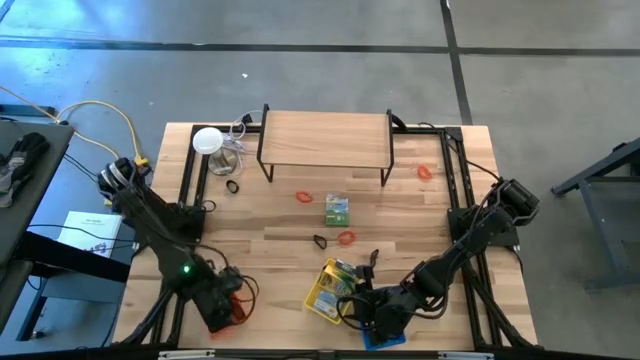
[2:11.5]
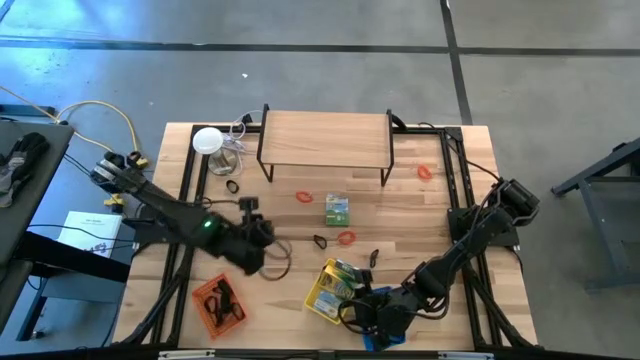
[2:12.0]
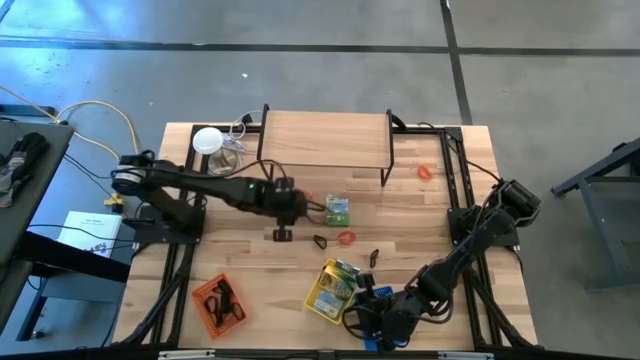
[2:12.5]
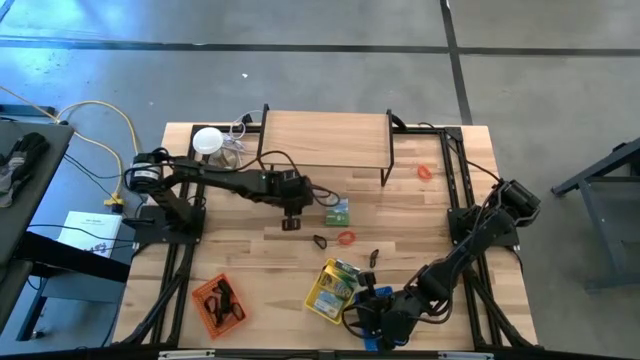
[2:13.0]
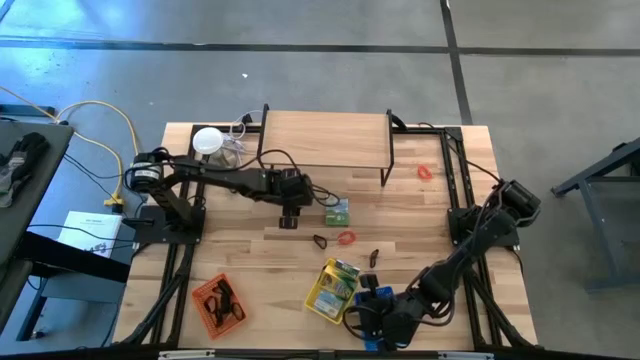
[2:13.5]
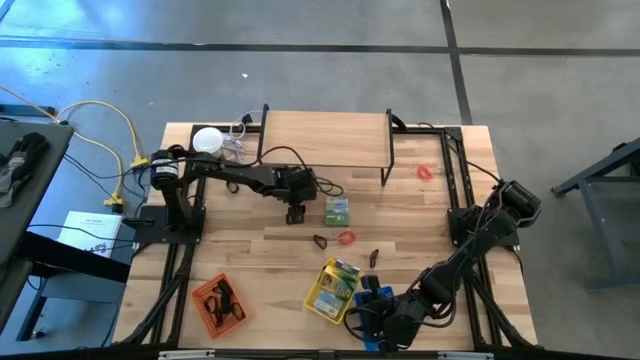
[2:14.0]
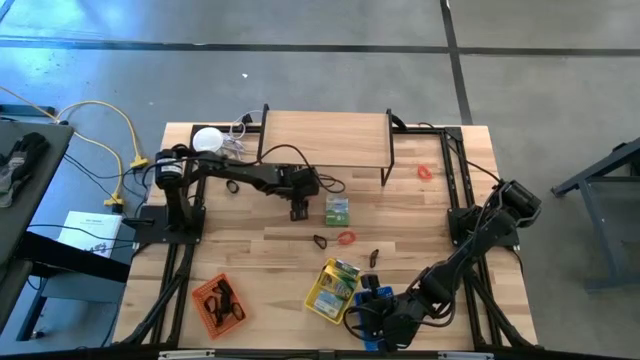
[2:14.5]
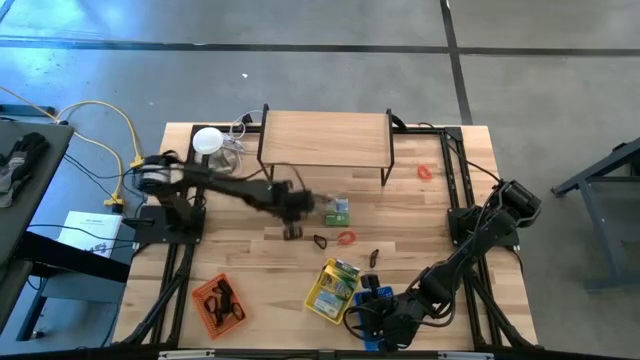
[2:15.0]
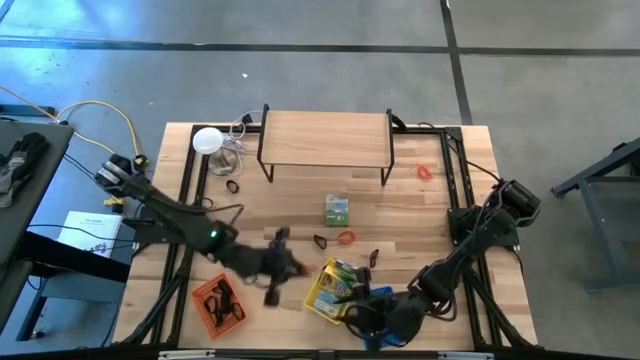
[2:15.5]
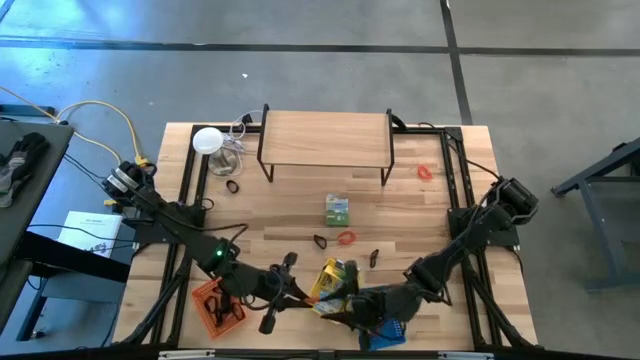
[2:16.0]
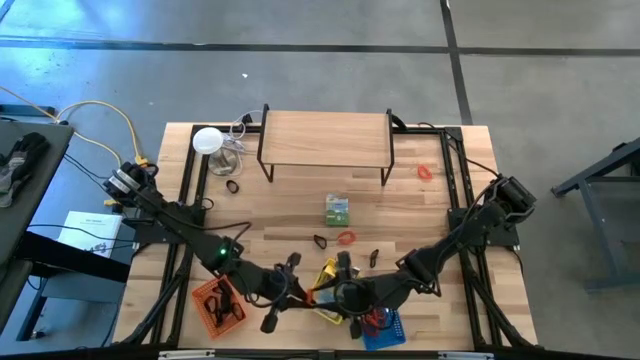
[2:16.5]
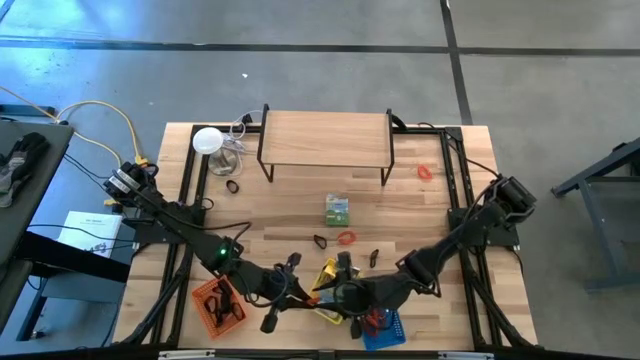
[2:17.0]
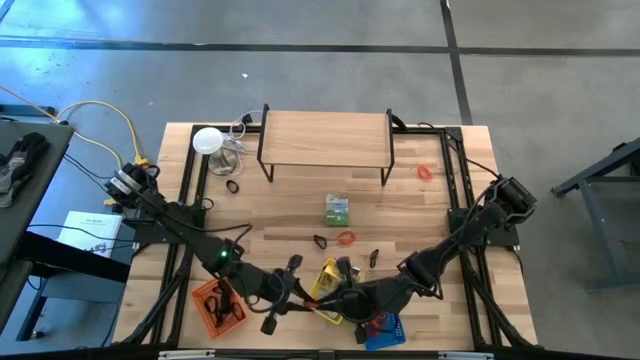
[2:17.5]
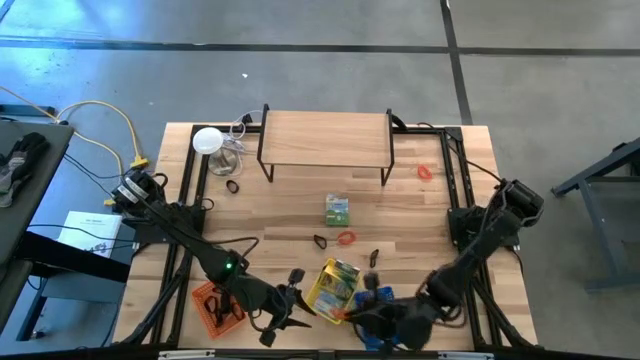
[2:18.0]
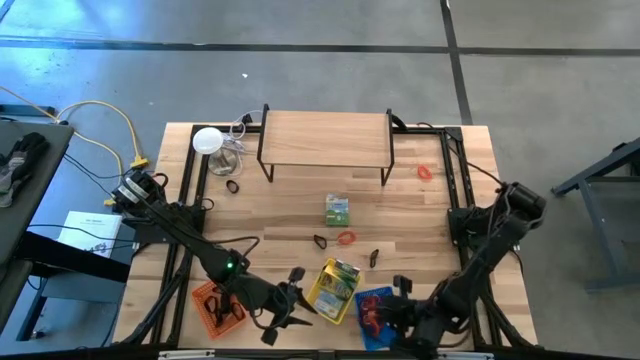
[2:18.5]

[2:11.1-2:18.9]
Task: Pick & Place Office Desk Supplies
Put the middle left orange spring keychain into the blue bin

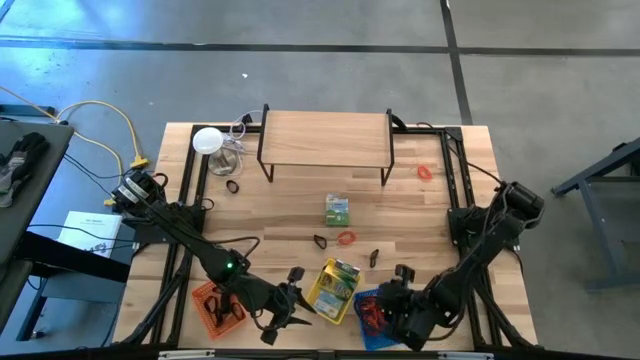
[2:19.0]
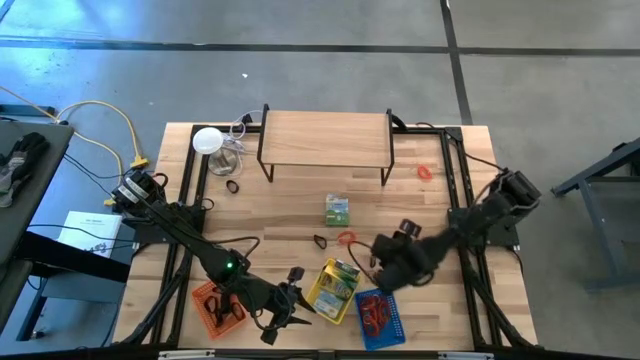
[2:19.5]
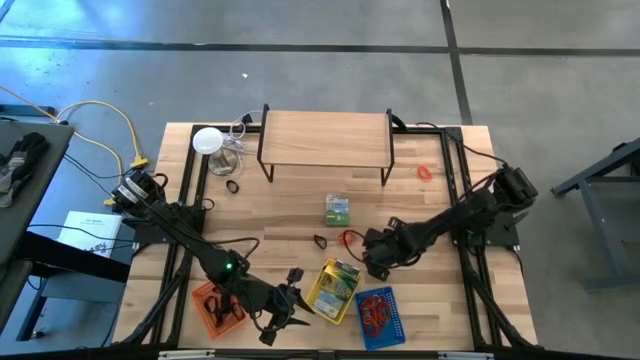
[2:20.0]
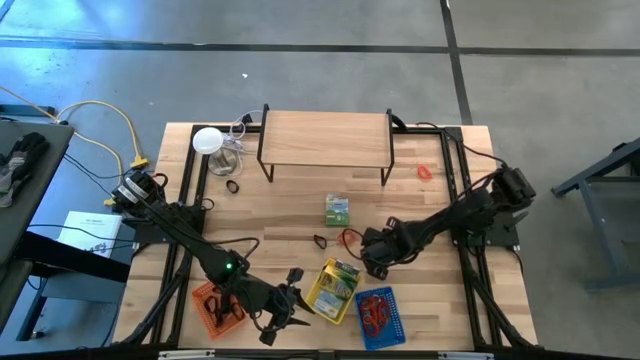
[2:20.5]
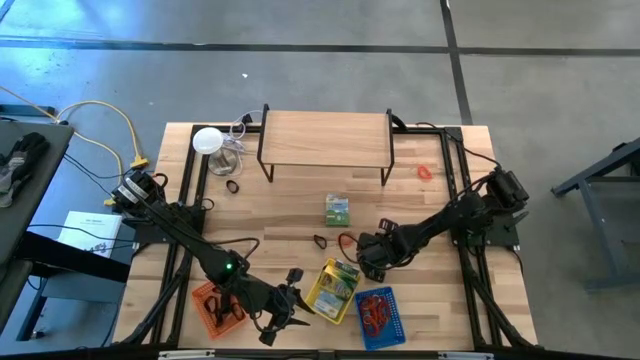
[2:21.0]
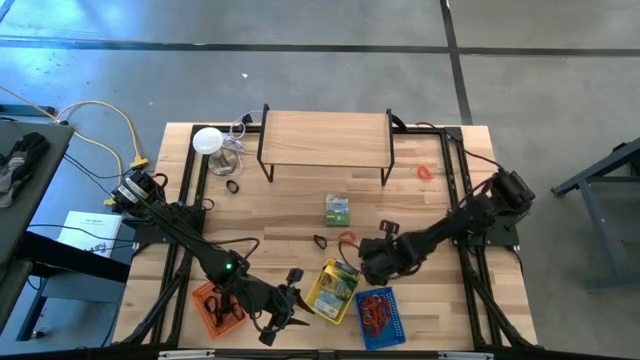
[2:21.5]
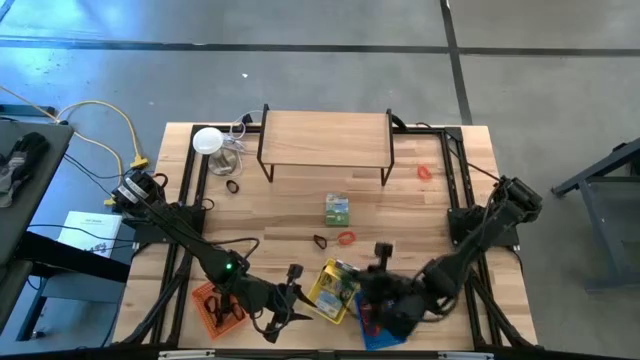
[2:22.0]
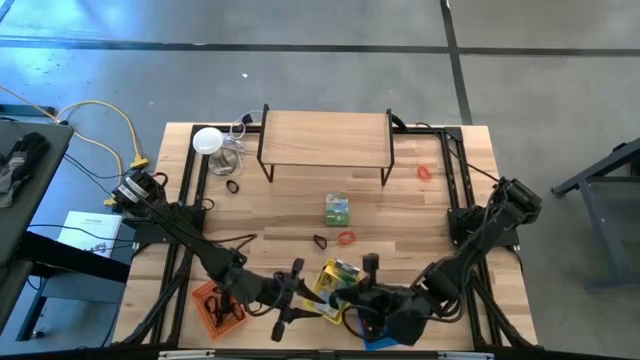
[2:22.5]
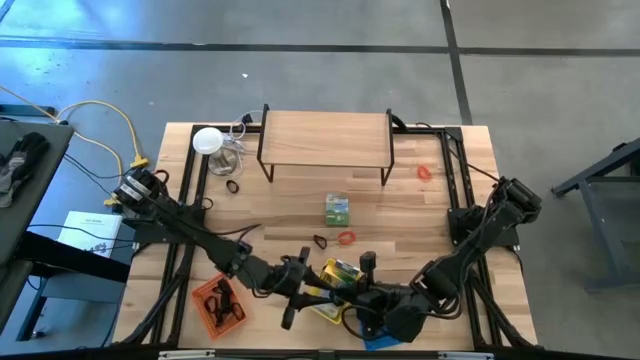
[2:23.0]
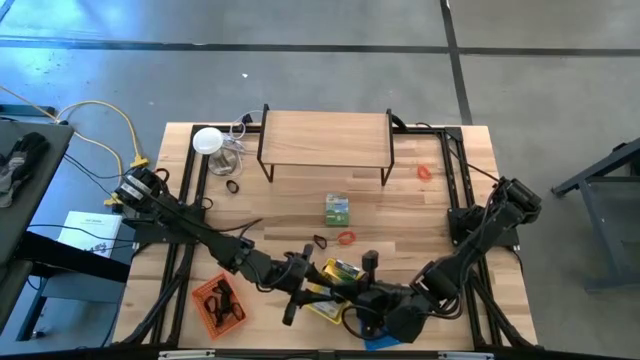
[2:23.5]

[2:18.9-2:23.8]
Put the bottom right black rubber band into the orange bin

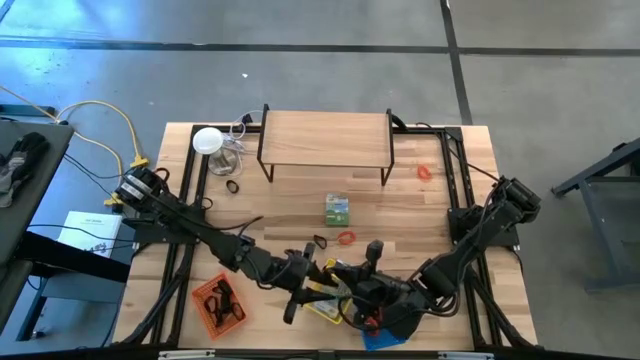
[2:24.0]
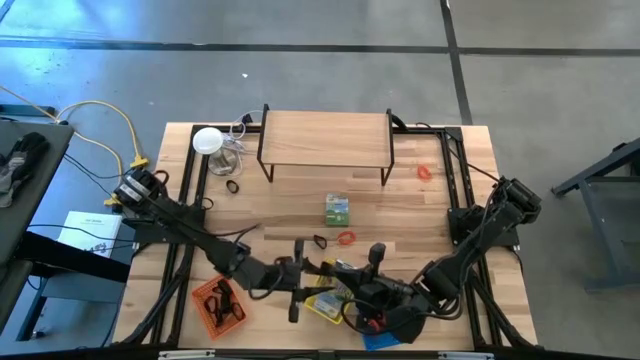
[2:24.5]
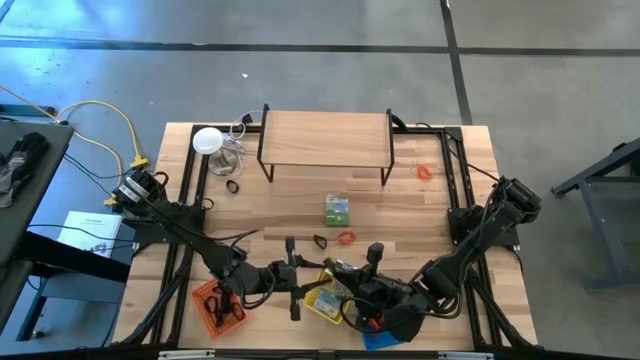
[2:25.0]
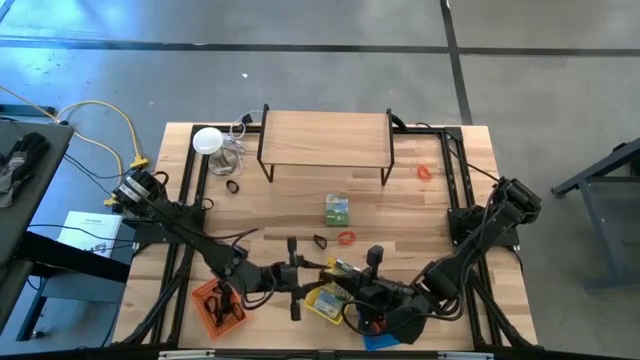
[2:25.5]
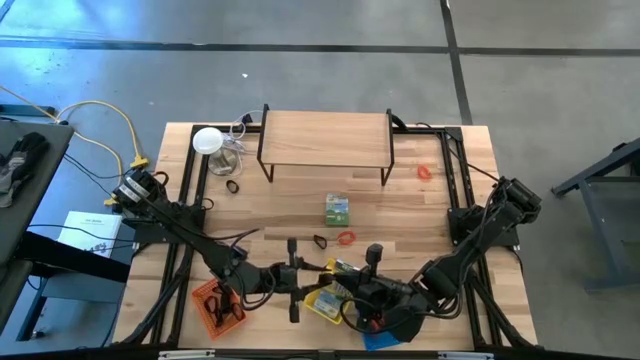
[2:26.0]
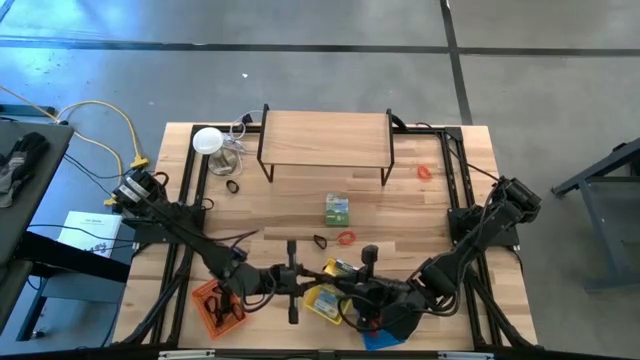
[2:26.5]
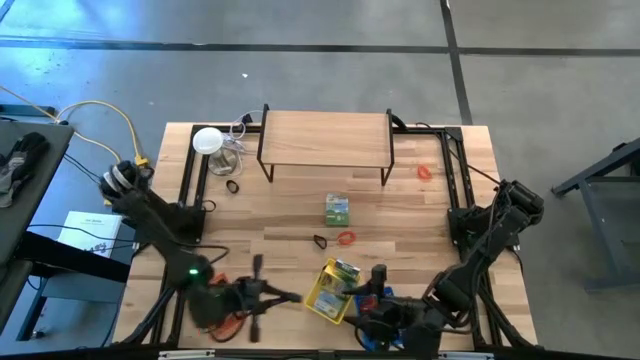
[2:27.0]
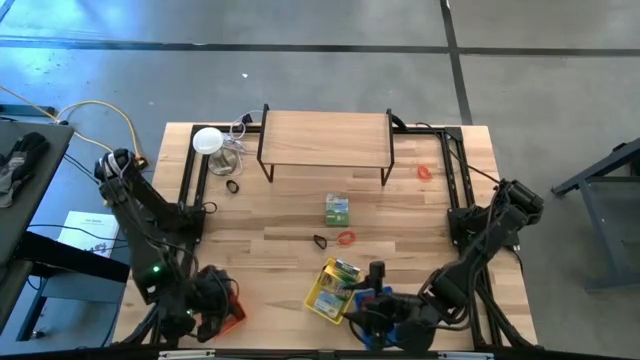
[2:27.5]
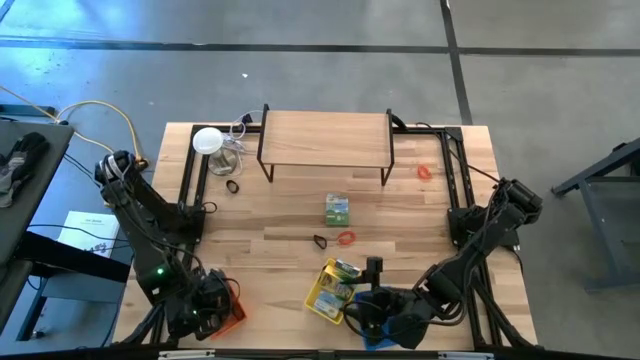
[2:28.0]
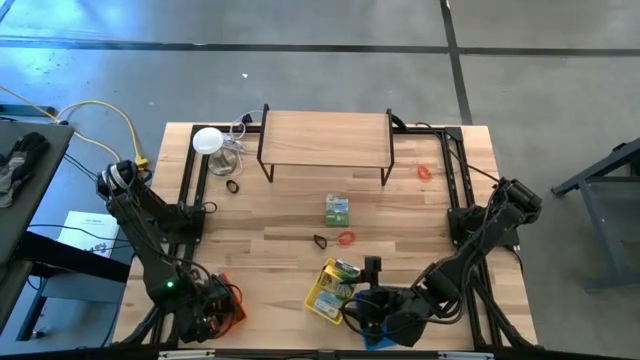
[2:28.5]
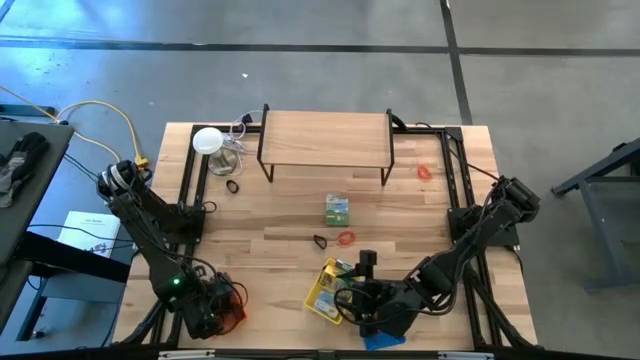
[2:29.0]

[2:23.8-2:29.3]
Put the bottom right black rubber band into the orange bin

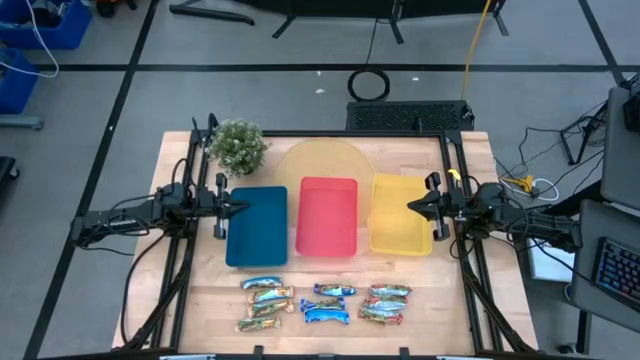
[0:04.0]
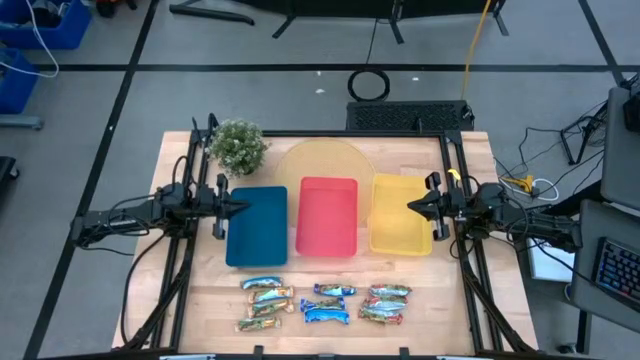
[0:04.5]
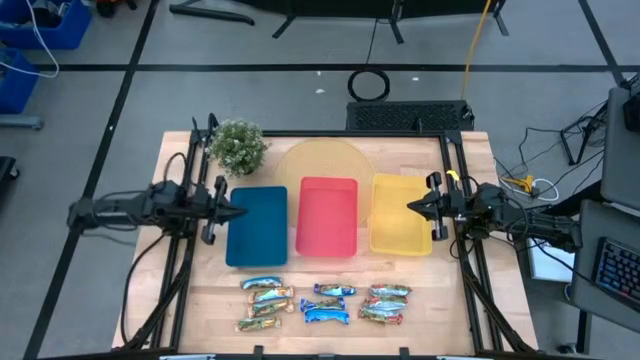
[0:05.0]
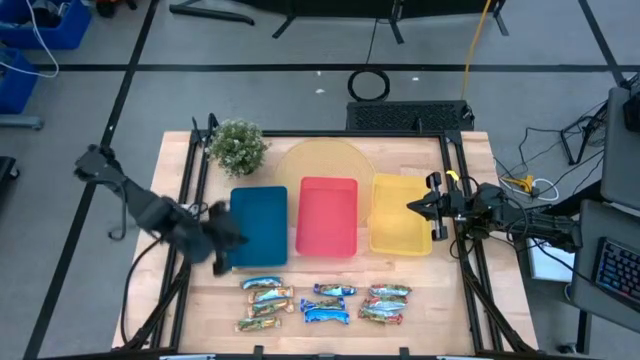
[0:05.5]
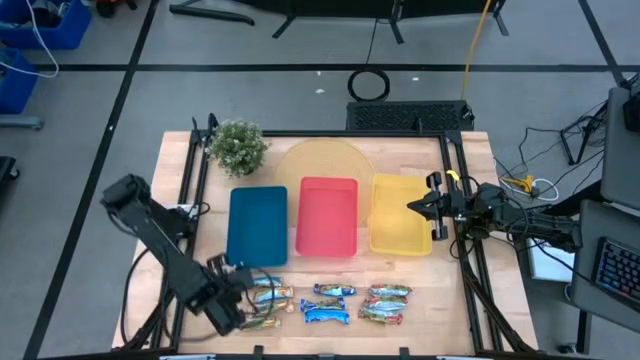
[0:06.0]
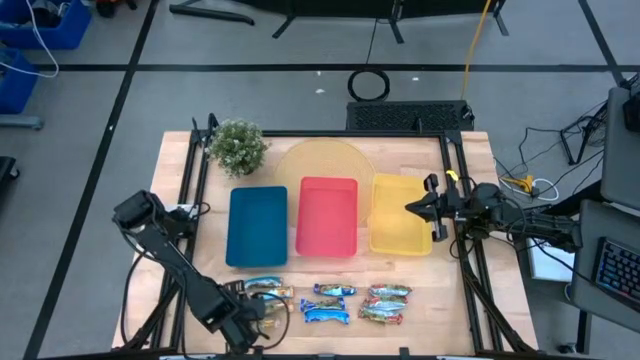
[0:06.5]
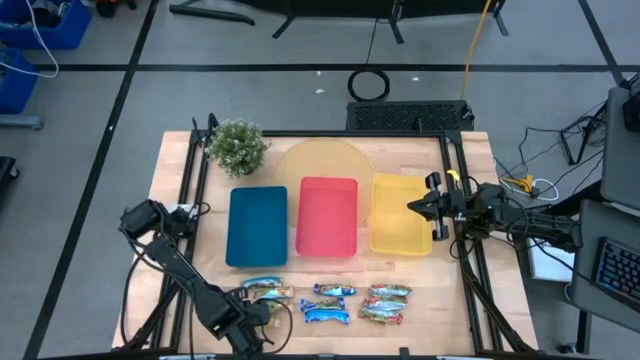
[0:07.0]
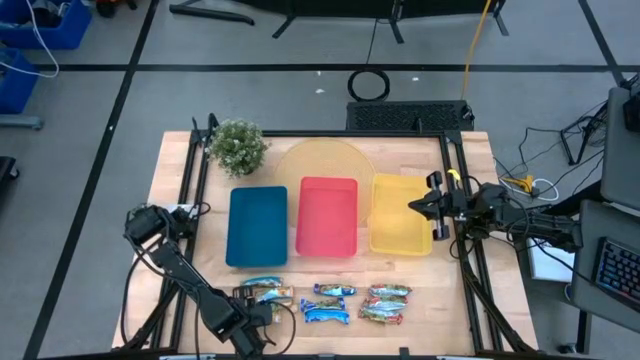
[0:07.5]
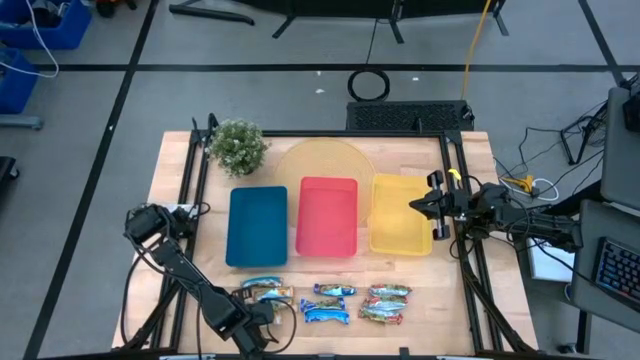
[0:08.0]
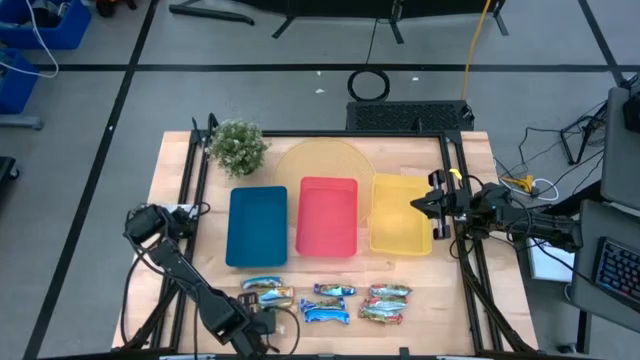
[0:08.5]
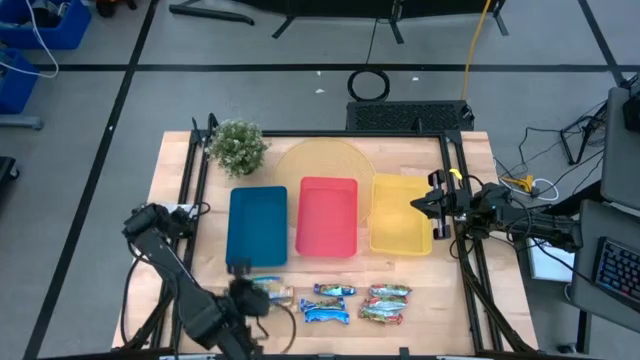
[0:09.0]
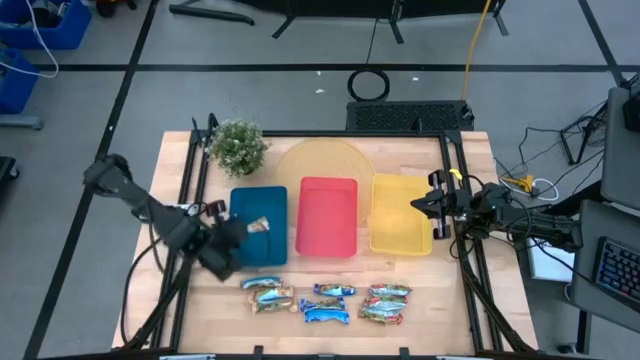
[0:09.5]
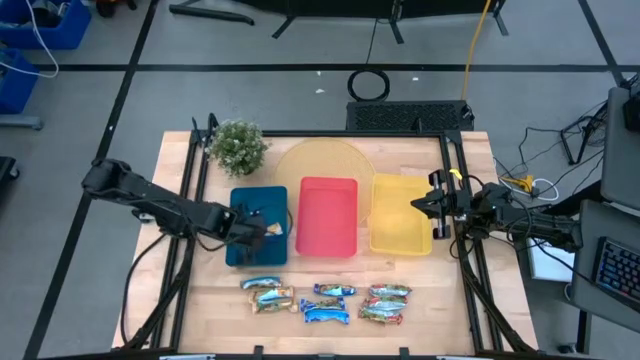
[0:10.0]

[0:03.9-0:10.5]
Task: Pick and place Granola Bars by type
Put the yellow granola bar into the blue bin
